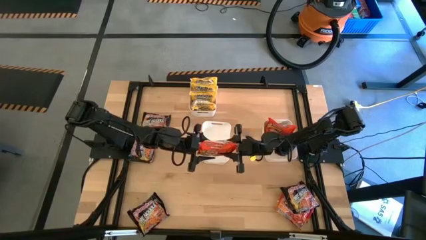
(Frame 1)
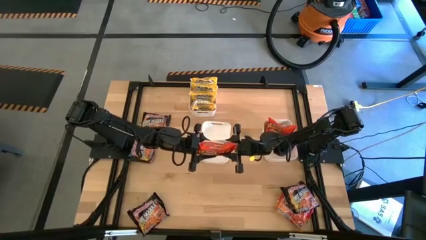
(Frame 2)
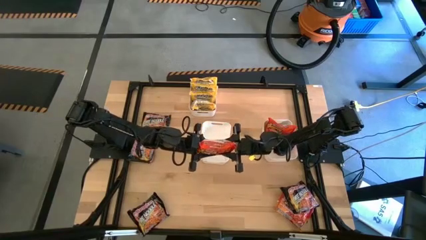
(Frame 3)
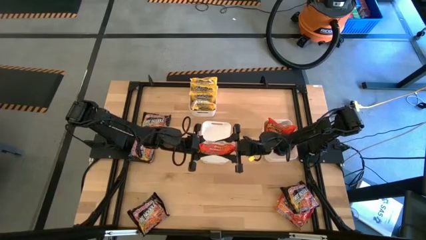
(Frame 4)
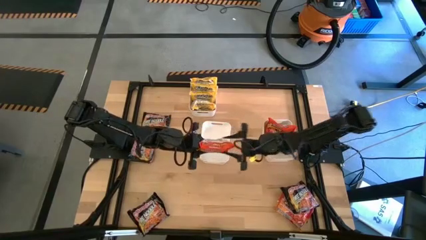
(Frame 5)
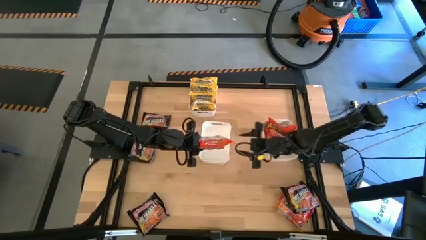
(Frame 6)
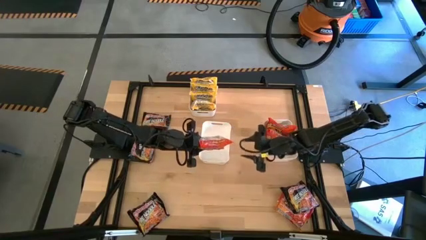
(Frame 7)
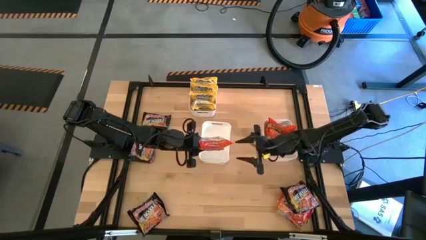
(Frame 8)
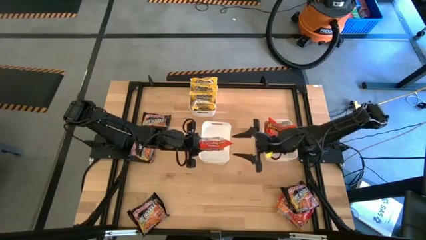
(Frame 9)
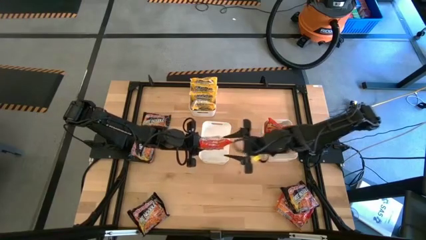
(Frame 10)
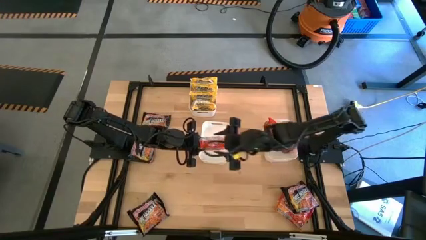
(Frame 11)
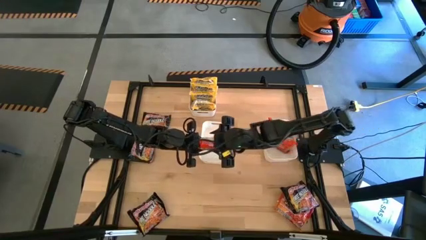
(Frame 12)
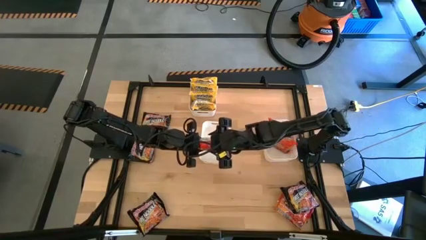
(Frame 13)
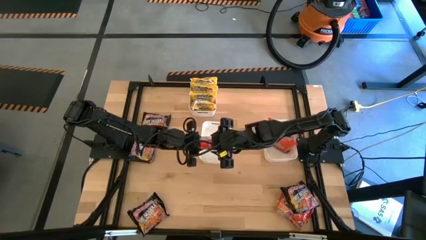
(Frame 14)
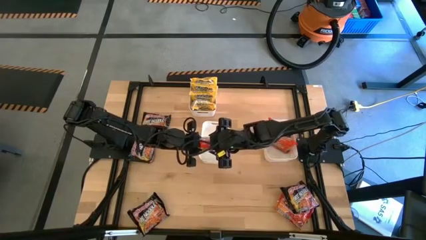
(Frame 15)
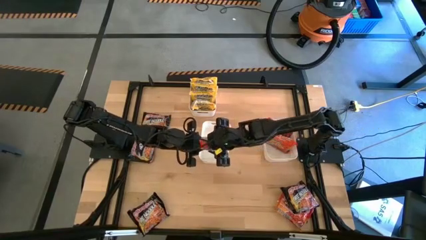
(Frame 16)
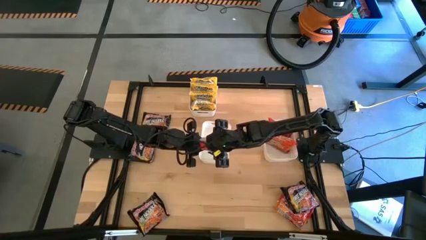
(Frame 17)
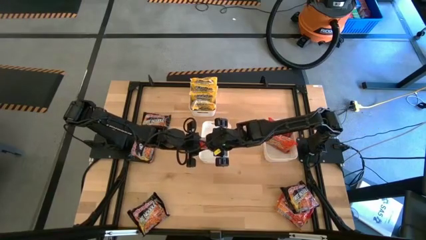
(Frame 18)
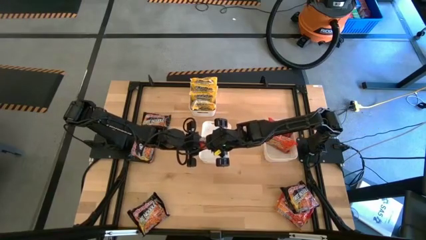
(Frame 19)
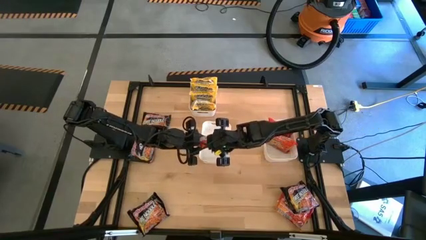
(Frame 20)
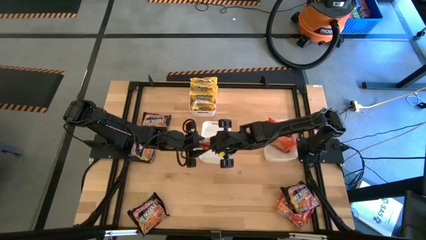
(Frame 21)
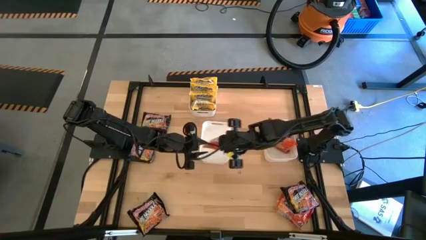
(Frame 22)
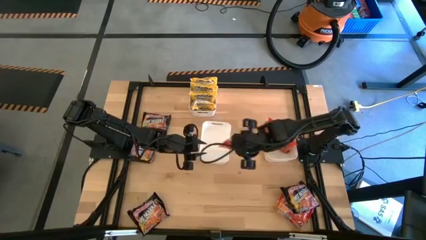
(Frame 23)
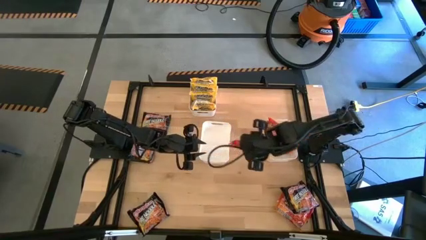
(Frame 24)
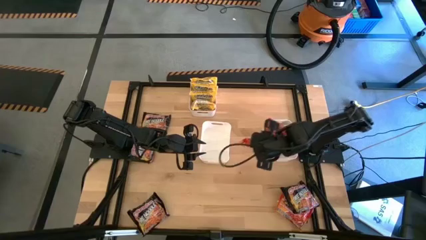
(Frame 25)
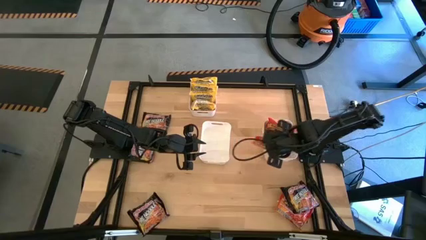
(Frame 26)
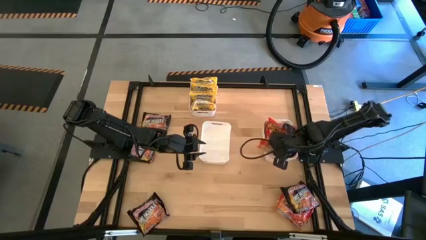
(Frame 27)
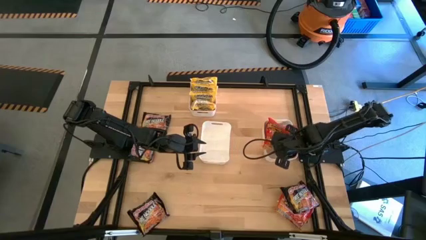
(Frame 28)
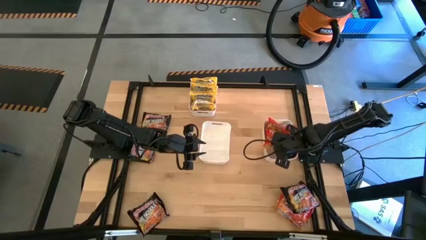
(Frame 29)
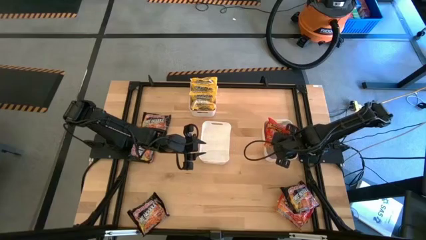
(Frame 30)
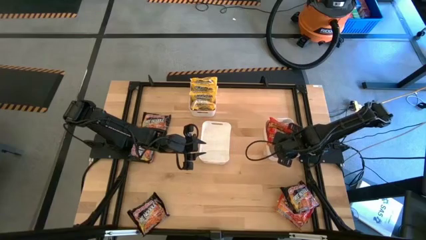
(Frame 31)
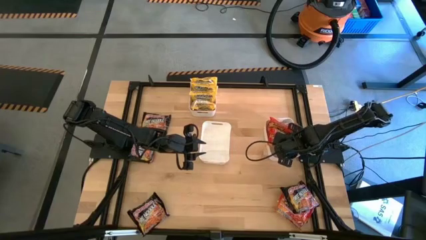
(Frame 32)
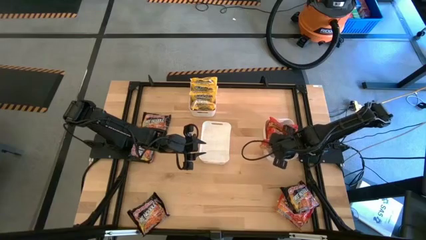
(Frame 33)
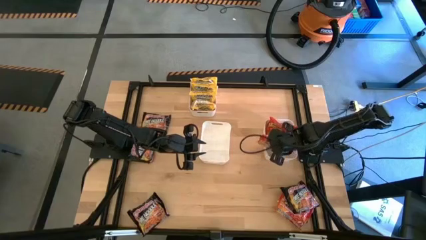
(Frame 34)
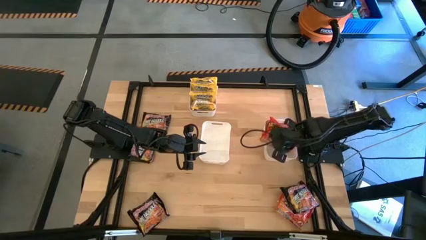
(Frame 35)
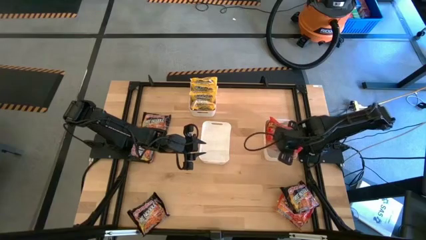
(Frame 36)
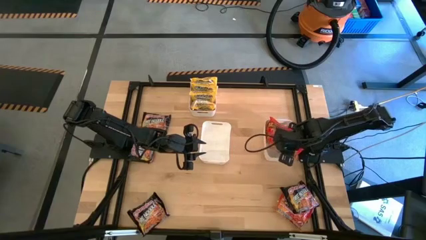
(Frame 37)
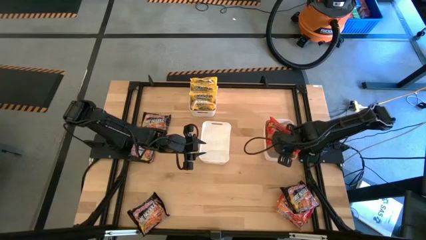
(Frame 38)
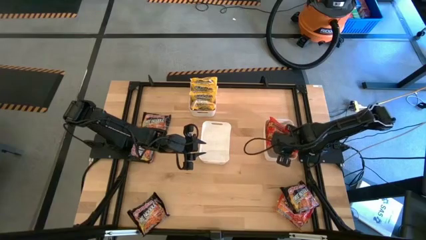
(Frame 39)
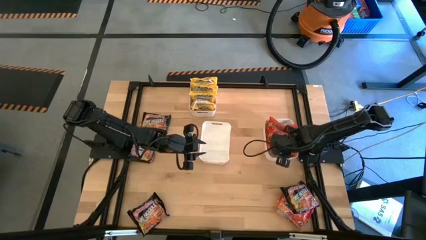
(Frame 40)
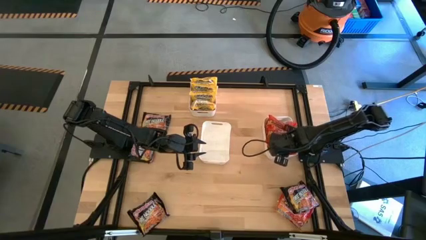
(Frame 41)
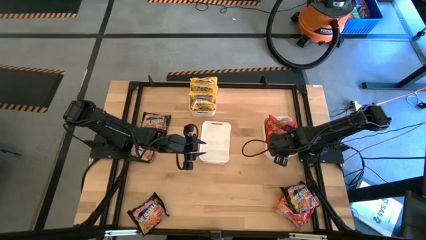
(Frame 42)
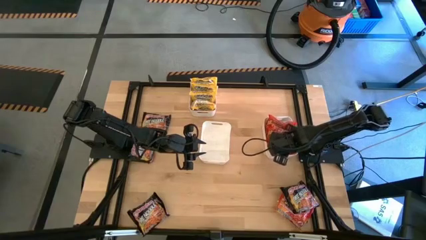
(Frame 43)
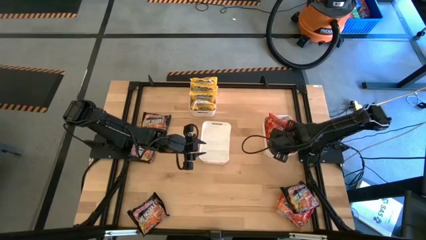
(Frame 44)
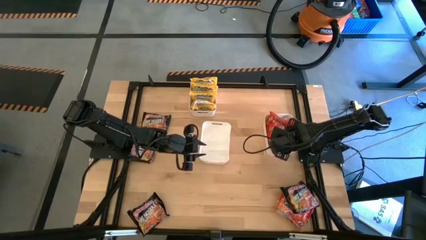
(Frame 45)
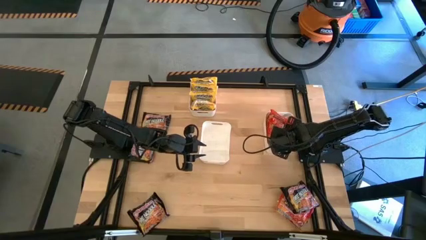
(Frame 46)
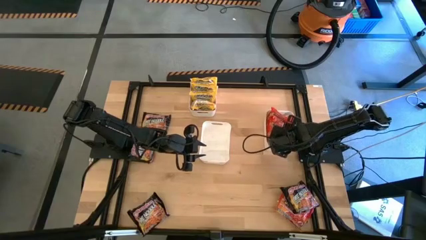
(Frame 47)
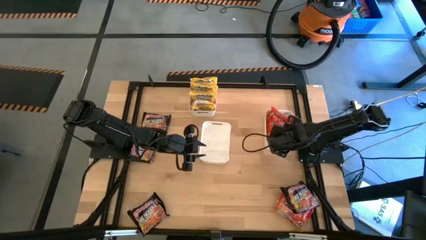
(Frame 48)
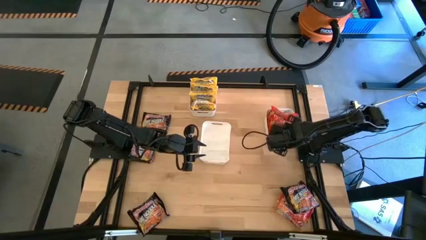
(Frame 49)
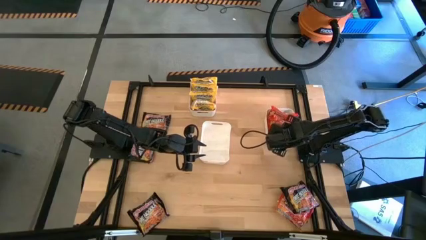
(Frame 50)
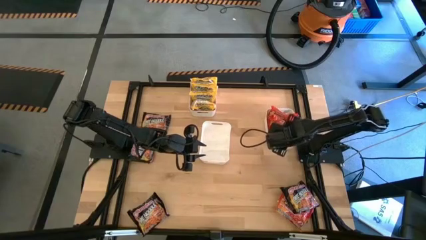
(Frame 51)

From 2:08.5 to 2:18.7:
Task: Sort Maruchan noodles
Put the orange noodle pack into the bottom right white bin

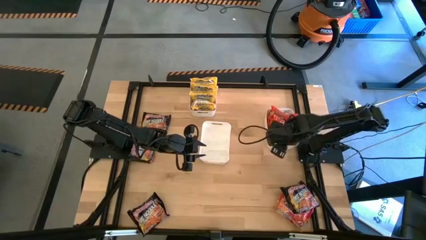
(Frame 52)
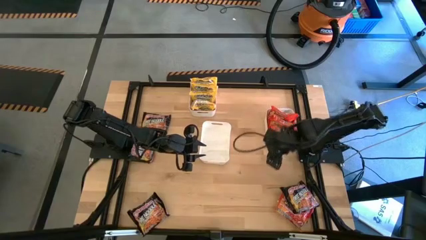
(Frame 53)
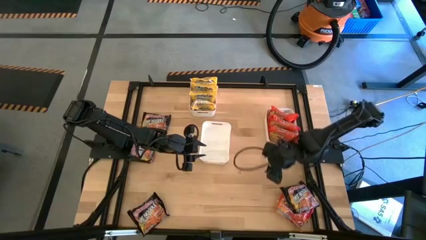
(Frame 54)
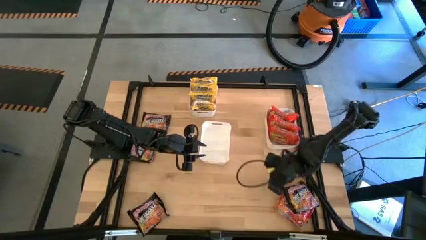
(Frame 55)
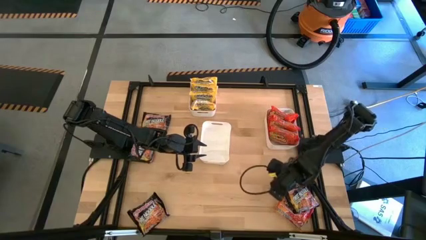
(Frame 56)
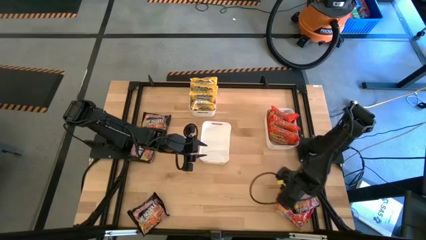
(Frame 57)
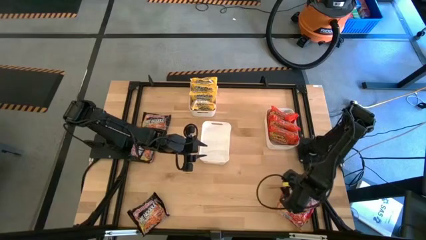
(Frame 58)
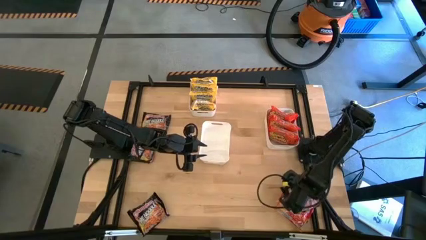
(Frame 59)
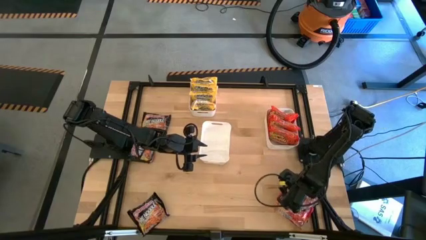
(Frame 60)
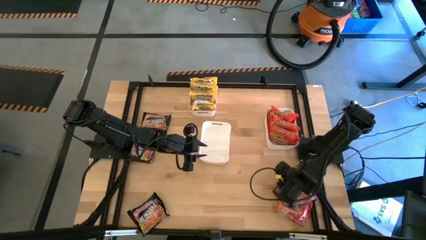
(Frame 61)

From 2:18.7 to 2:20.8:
Move the black noodle pack to the top
